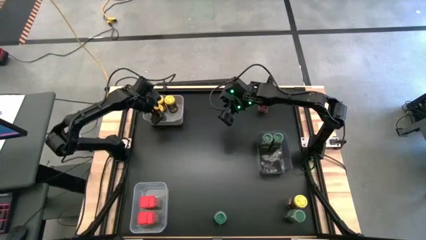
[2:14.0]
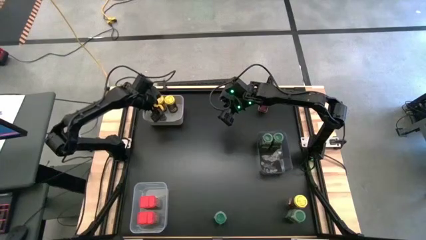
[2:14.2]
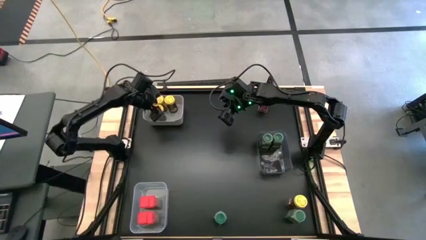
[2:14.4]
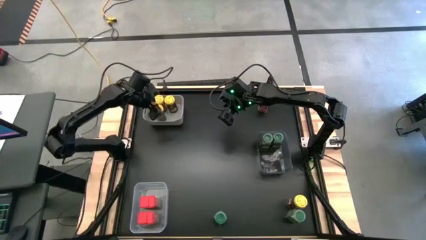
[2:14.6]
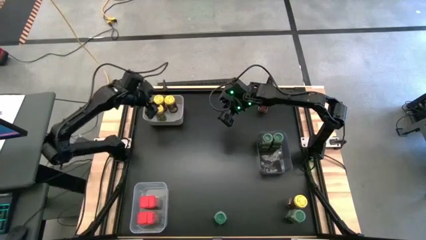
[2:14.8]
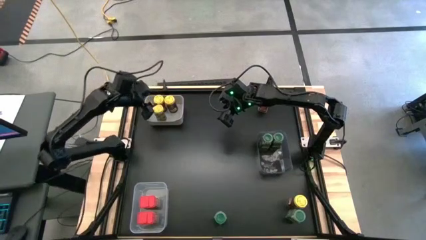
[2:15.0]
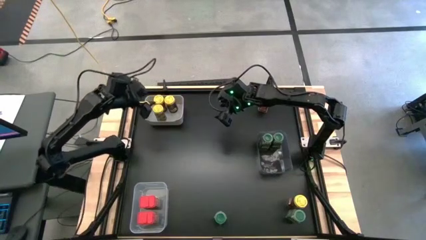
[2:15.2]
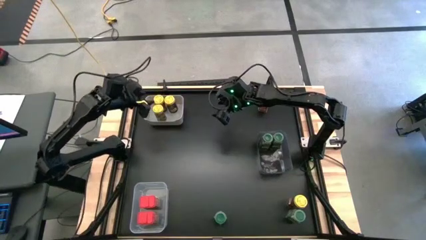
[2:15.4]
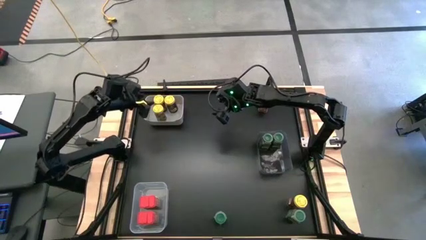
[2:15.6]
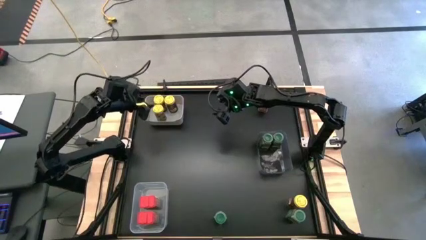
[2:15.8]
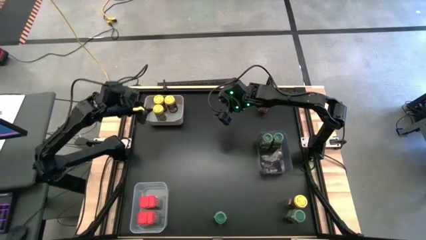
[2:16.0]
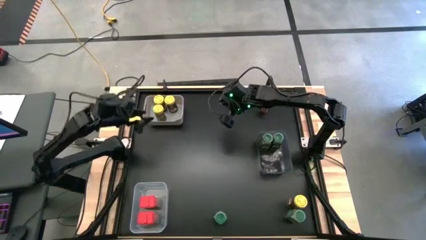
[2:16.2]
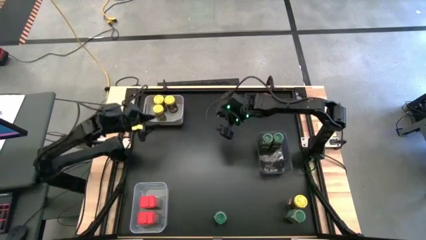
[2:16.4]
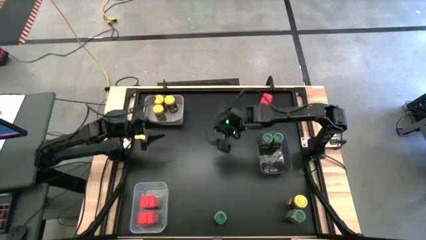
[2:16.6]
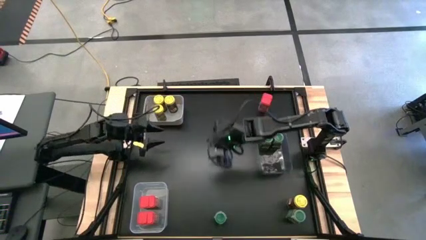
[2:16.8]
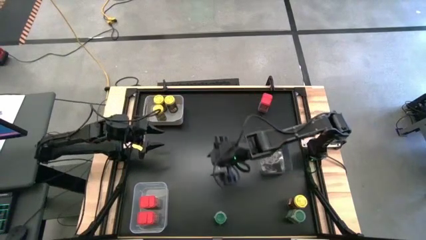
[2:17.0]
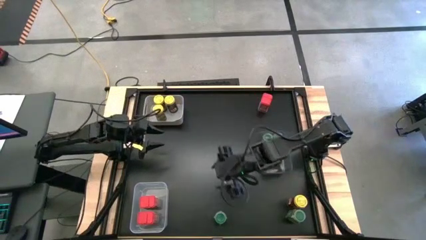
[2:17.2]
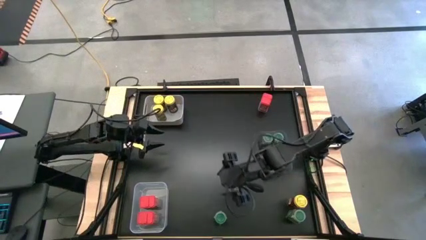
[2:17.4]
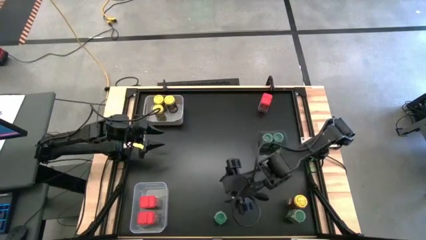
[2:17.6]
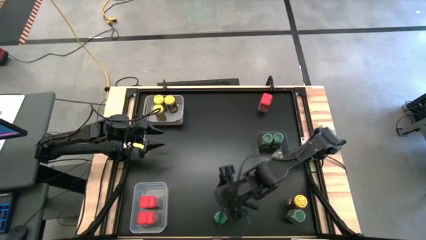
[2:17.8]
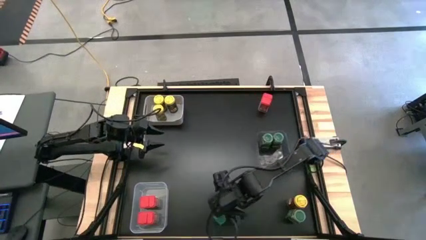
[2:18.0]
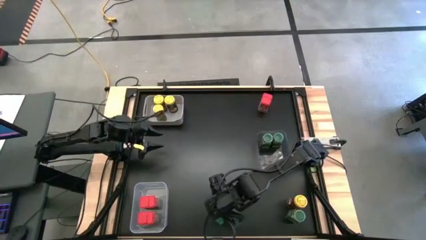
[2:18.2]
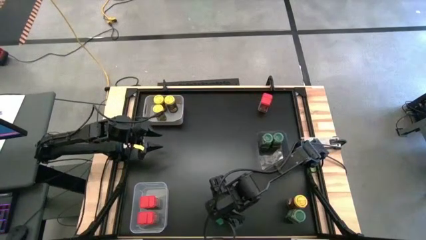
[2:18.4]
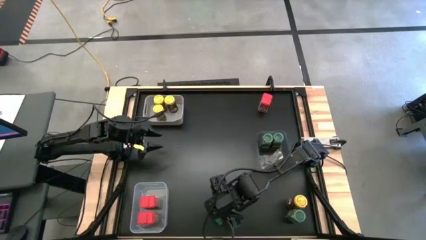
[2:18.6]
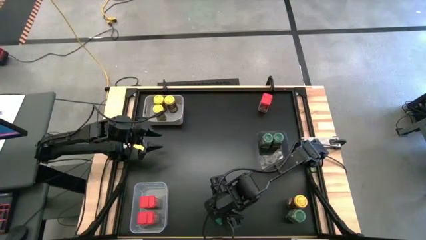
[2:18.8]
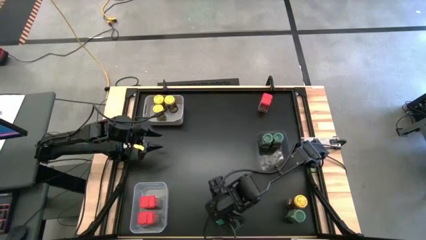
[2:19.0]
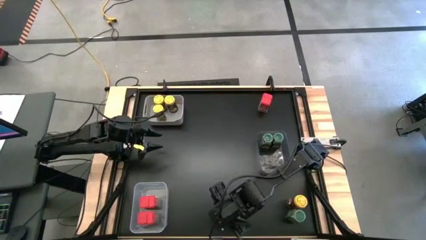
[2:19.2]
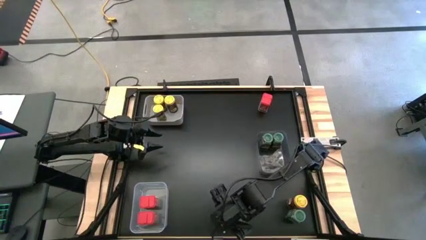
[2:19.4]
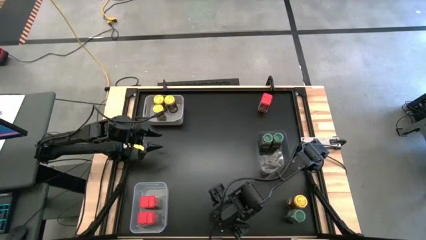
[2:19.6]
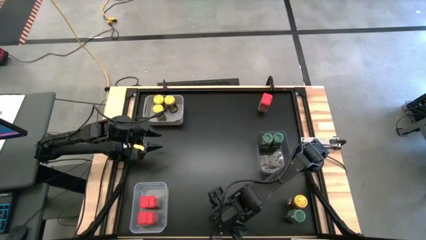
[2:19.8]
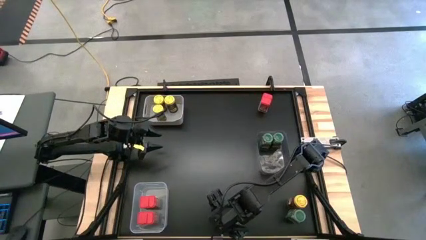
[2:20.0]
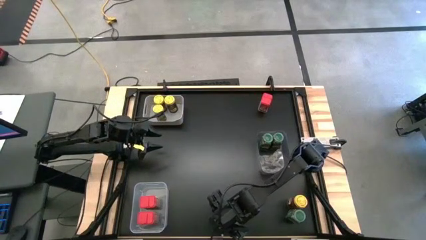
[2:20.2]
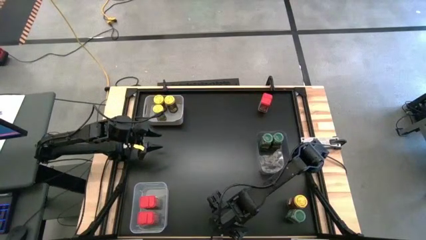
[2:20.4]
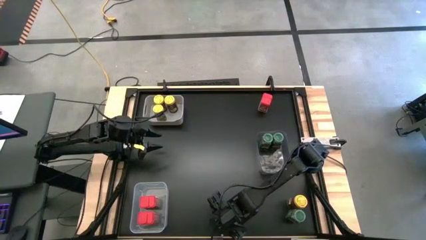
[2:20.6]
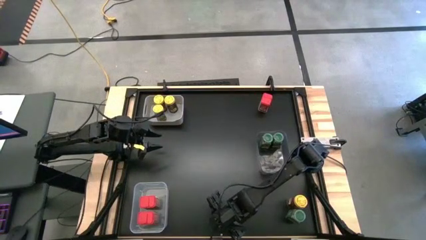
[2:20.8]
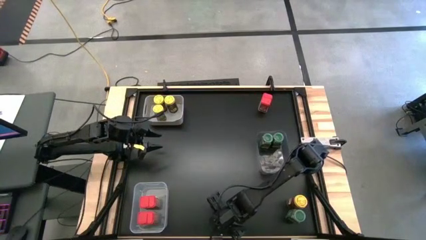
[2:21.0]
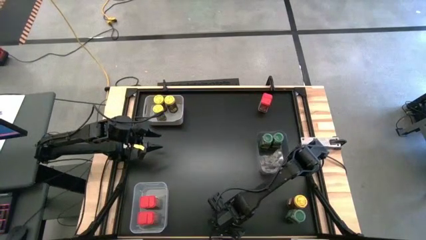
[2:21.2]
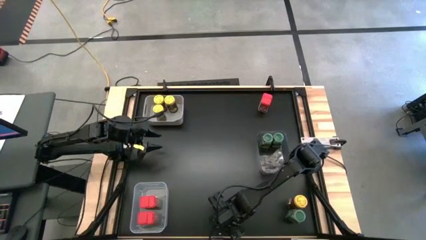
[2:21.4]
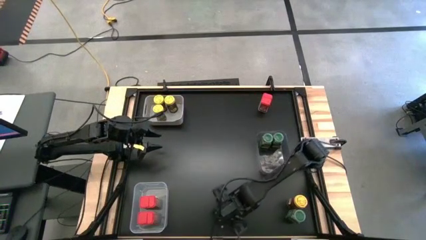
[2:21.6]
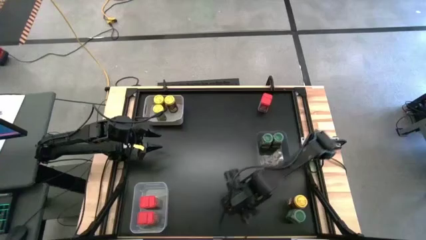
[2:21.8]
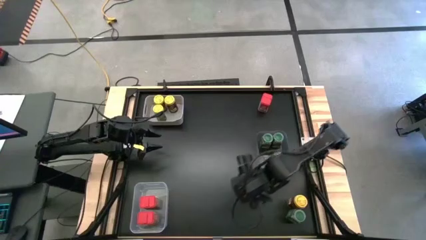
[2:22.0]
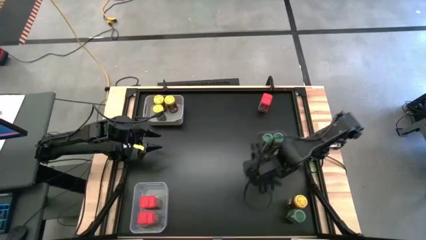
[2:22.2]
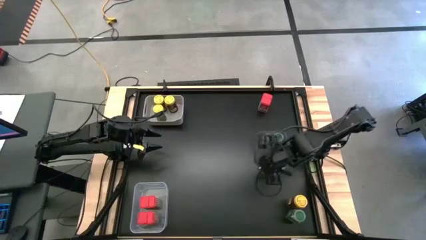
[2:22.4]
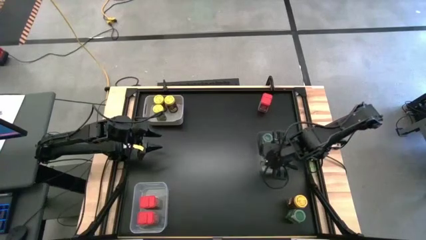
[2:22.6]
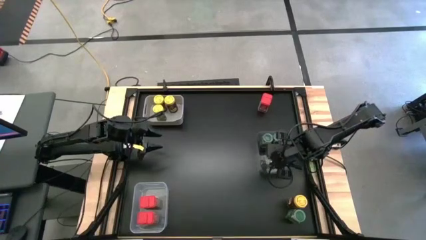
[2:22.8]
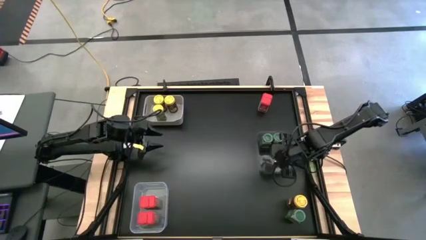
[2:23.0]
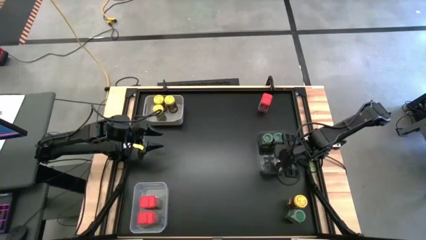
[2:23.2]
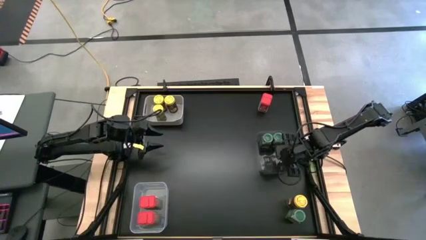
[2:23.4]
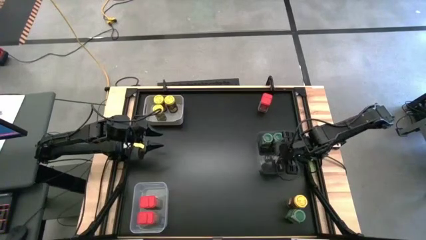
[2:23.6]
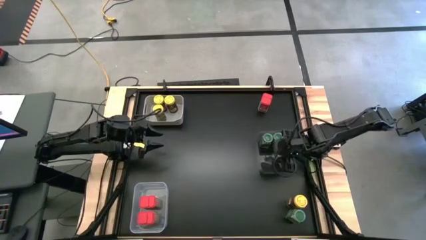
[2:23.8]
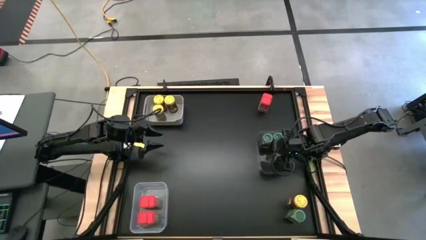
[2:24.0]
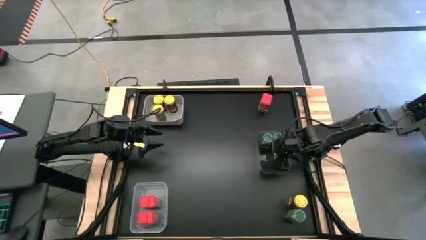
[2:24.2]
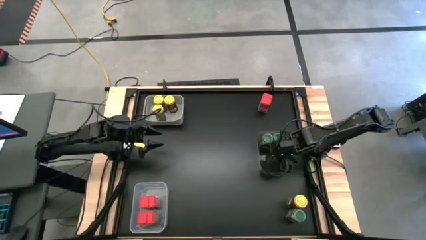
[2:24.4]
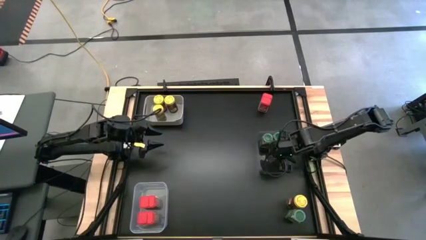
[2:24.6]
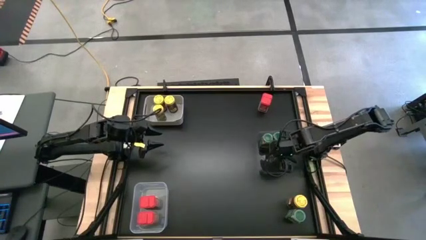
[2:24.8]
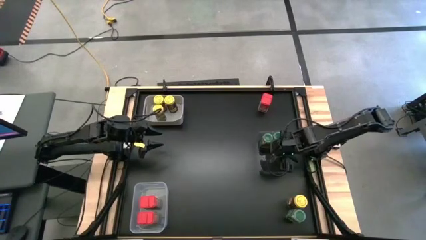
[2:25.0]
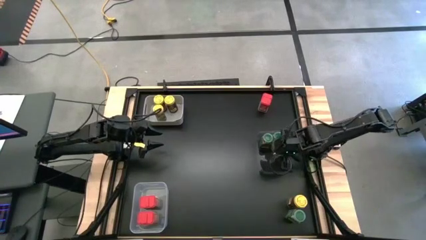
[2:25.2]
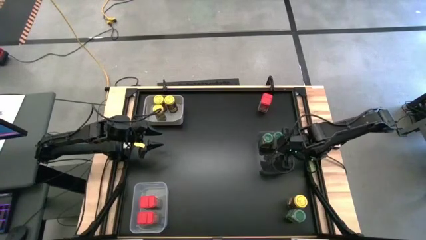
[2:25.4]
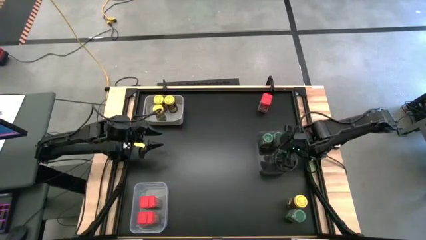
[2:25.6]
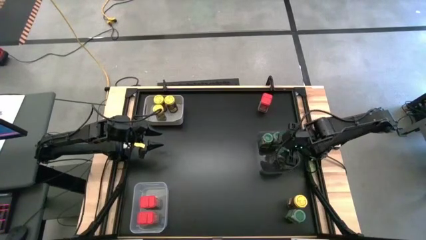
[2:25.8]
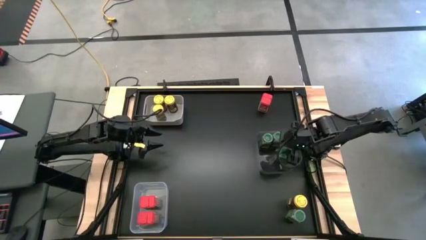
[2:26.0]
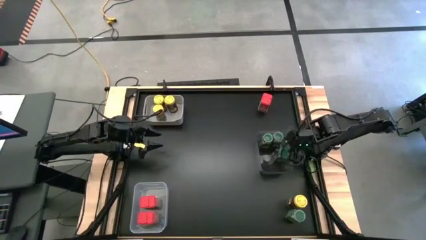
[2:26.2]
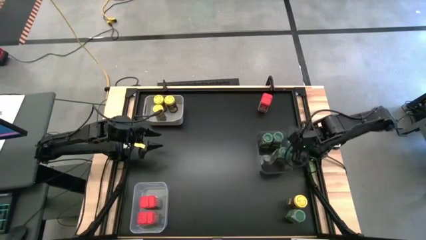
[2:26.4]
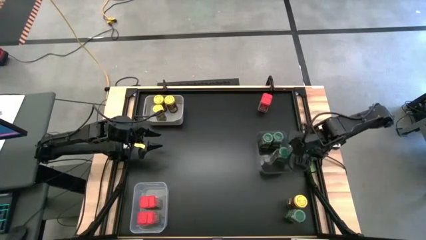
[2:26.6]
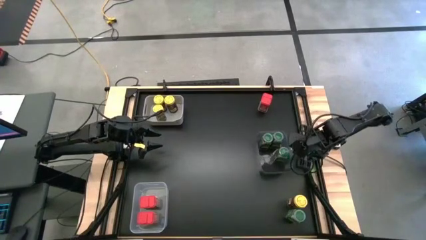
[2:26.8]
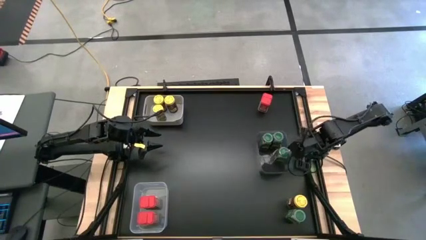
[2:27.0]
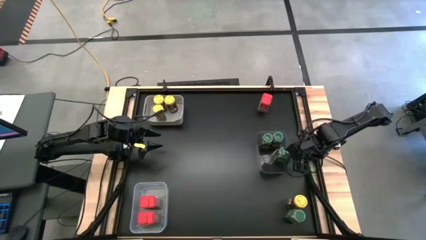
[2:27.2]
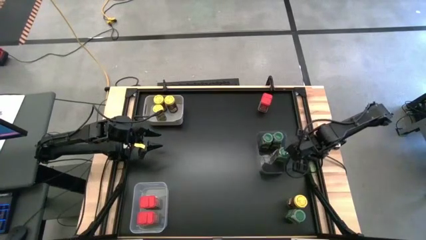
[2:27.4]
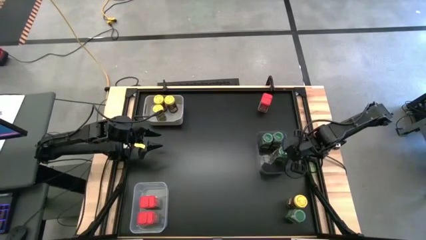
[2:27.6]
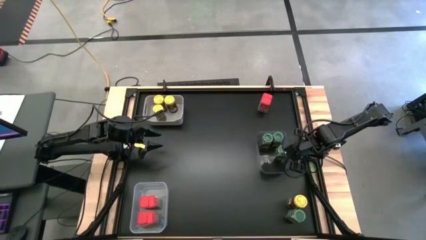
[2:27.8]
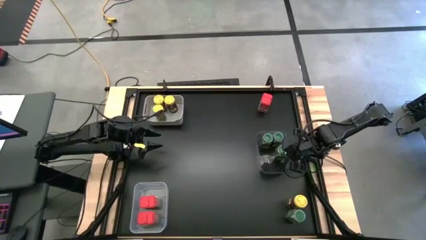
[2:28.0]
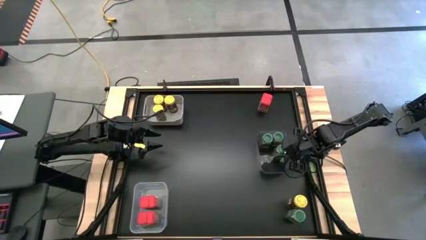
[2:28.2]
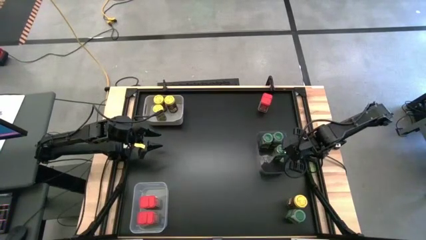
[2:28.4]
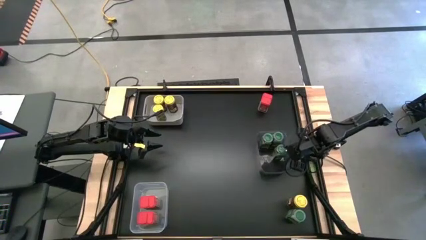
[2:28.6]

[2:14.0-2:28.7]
Task: Sort spices by type
Put the left green seasoning bottle into the black bin
